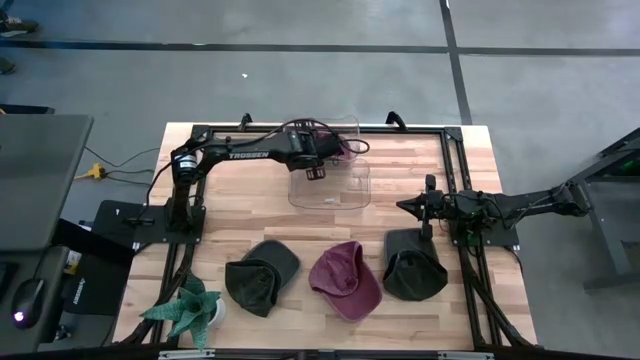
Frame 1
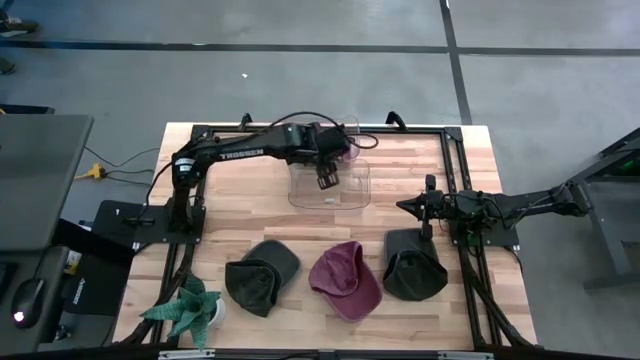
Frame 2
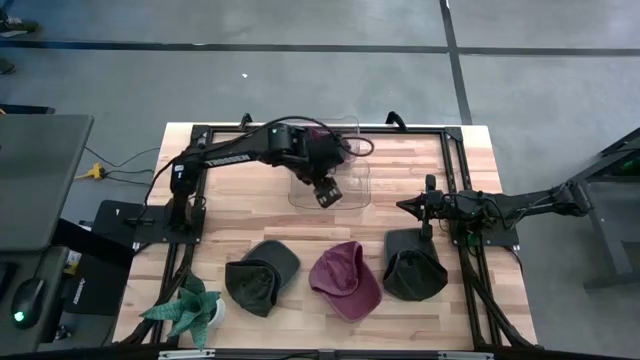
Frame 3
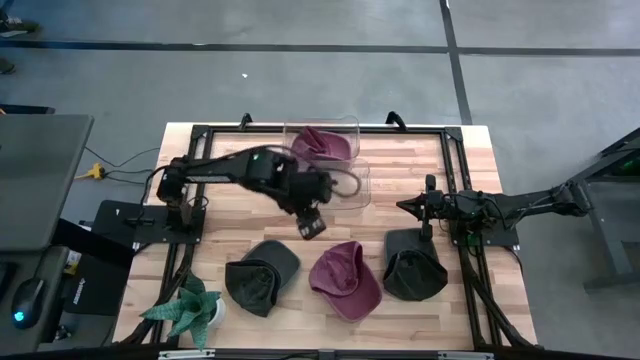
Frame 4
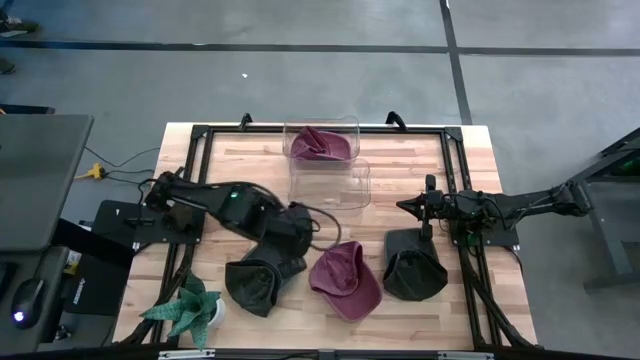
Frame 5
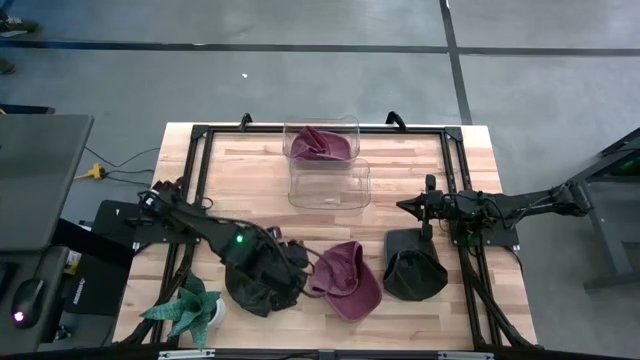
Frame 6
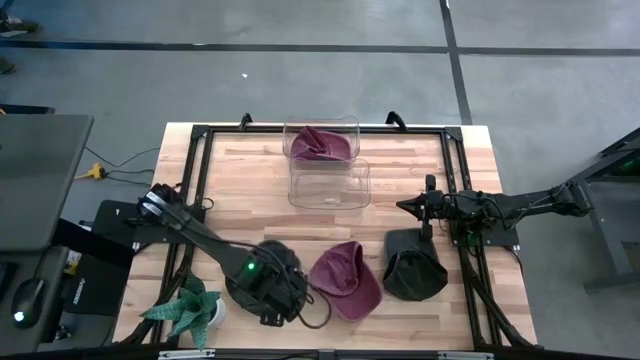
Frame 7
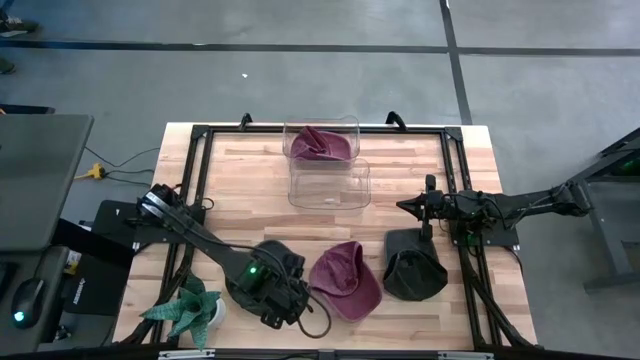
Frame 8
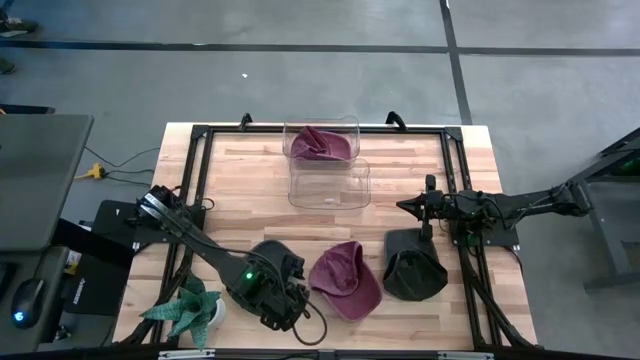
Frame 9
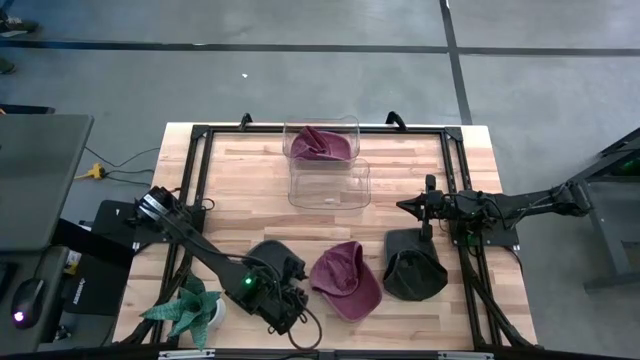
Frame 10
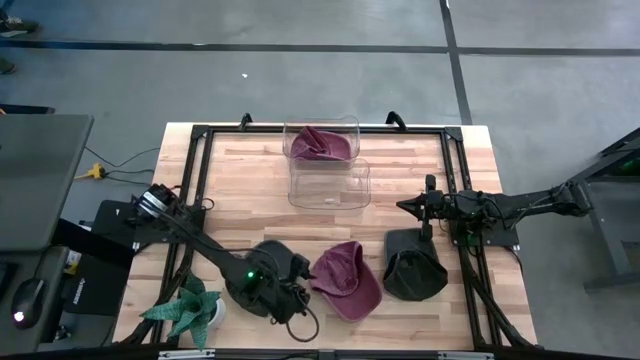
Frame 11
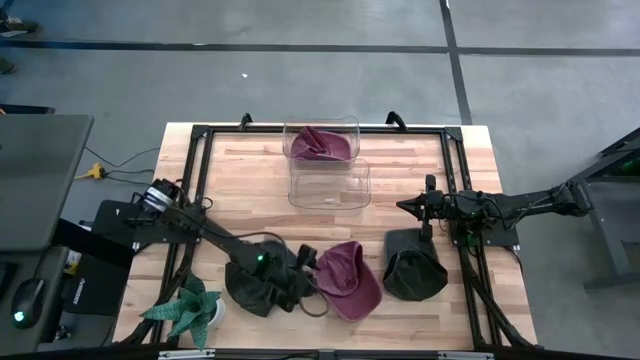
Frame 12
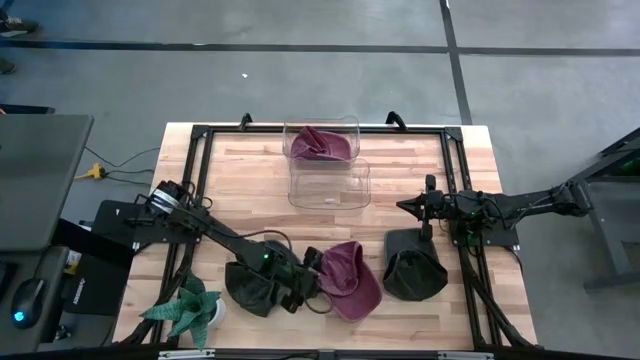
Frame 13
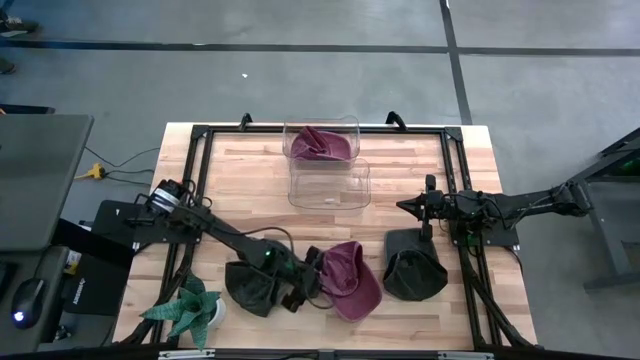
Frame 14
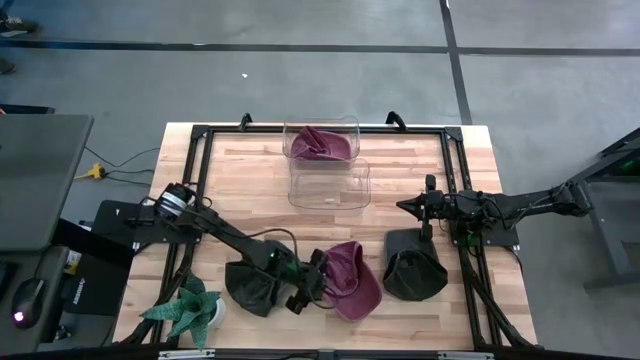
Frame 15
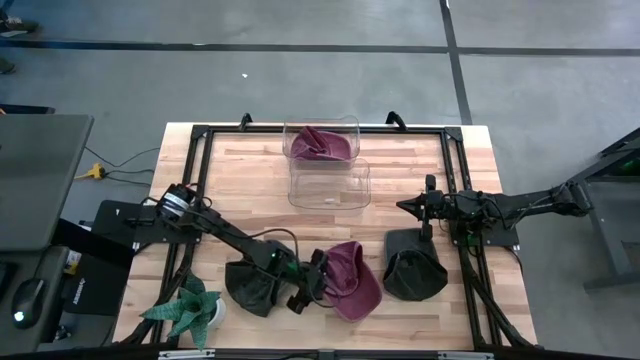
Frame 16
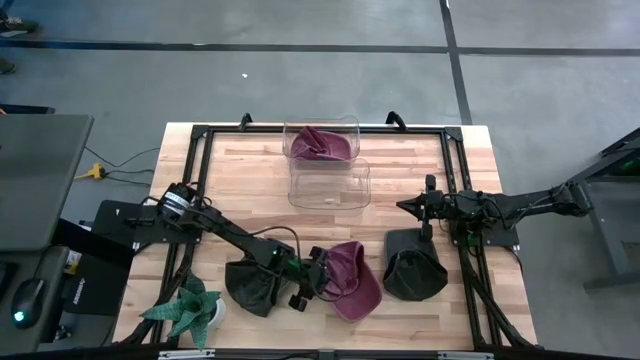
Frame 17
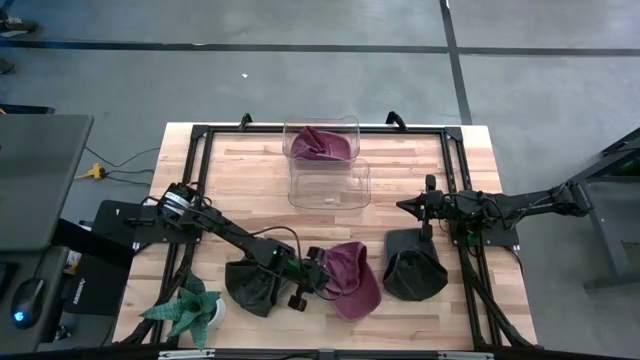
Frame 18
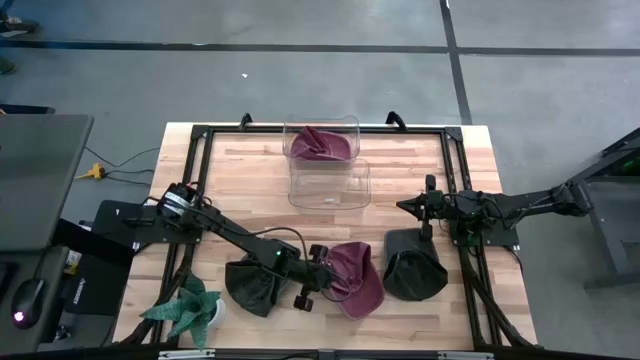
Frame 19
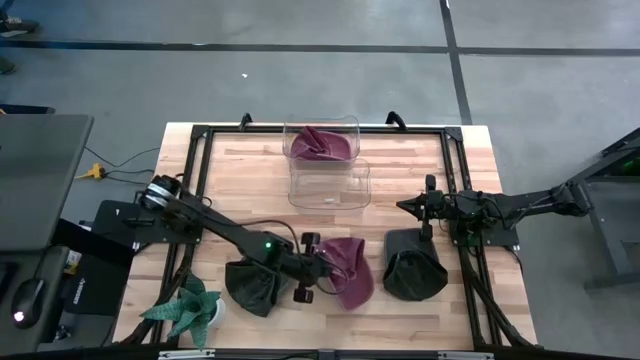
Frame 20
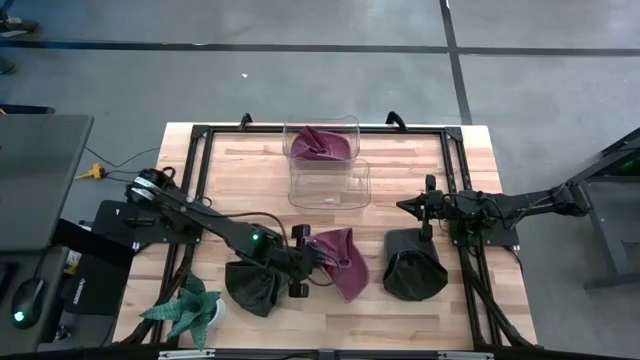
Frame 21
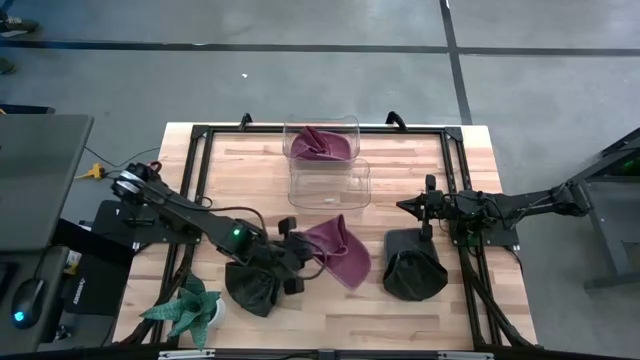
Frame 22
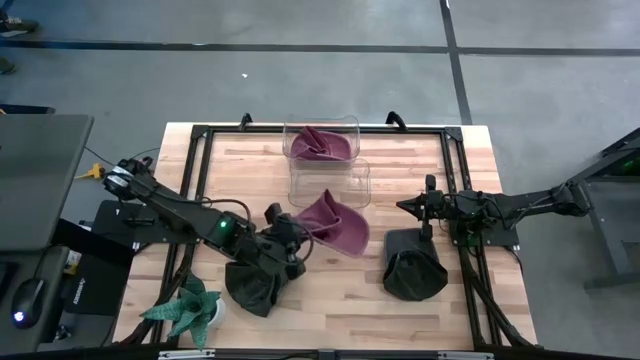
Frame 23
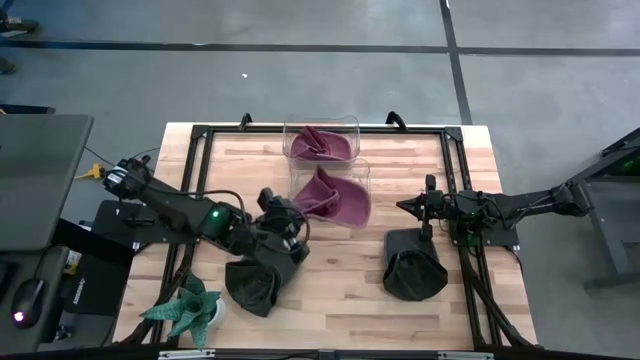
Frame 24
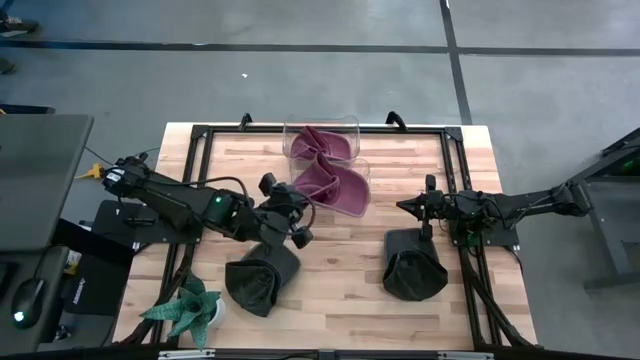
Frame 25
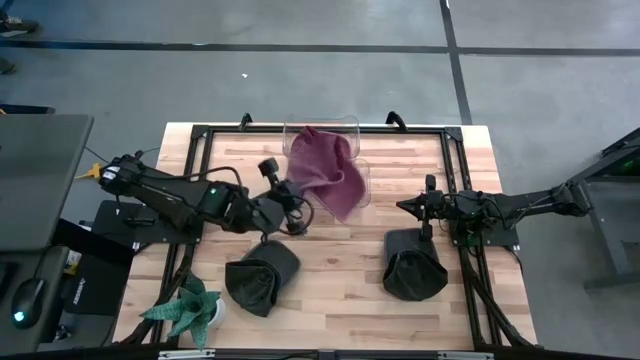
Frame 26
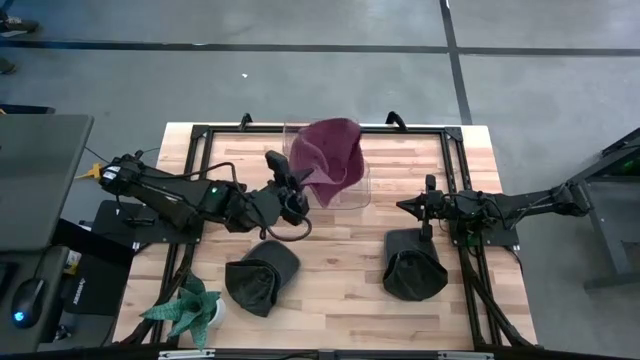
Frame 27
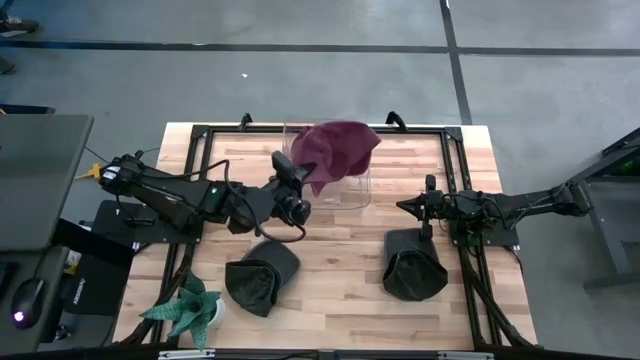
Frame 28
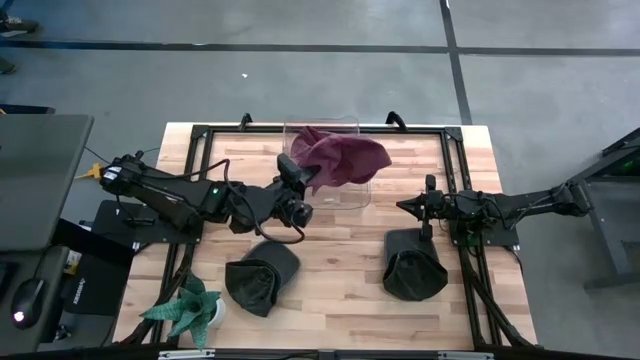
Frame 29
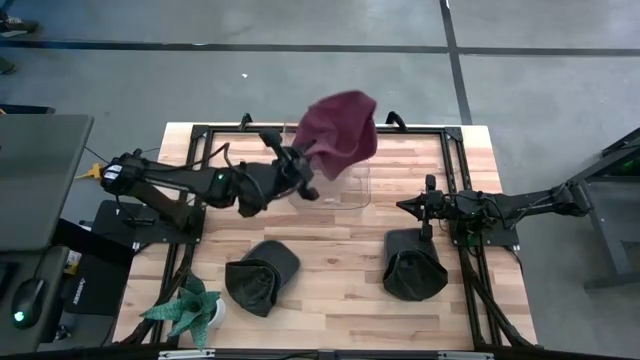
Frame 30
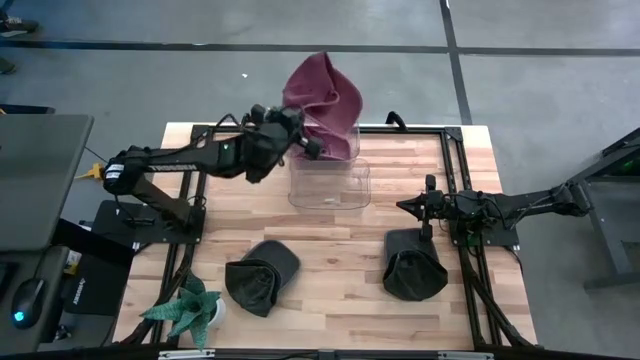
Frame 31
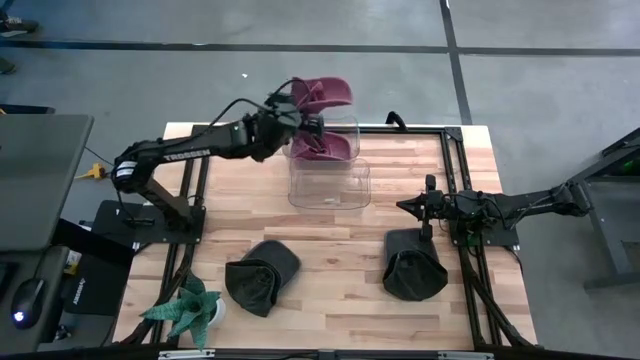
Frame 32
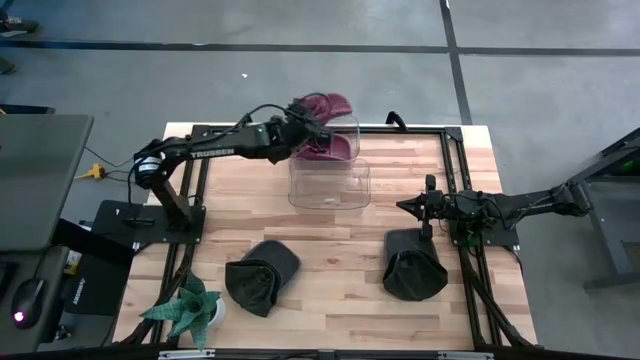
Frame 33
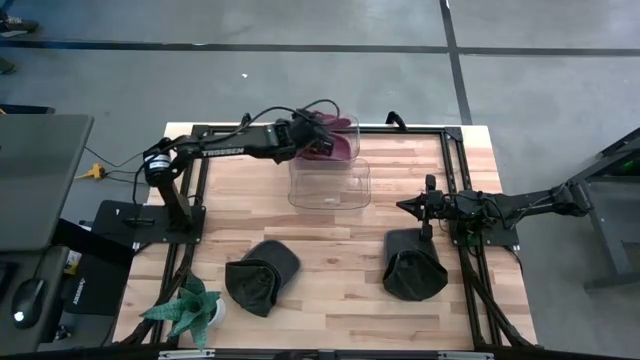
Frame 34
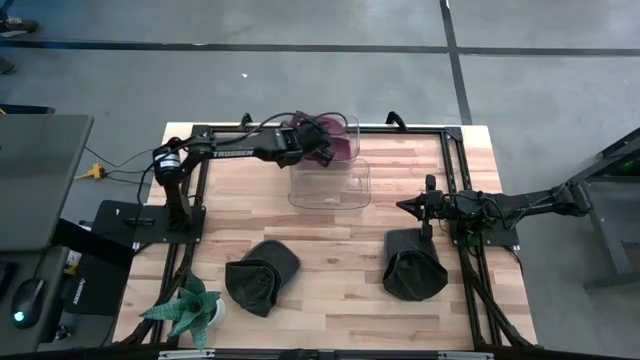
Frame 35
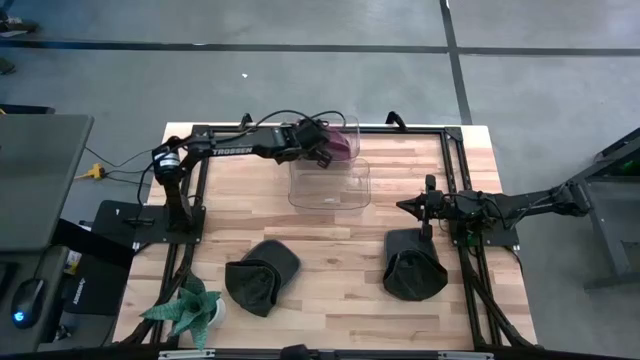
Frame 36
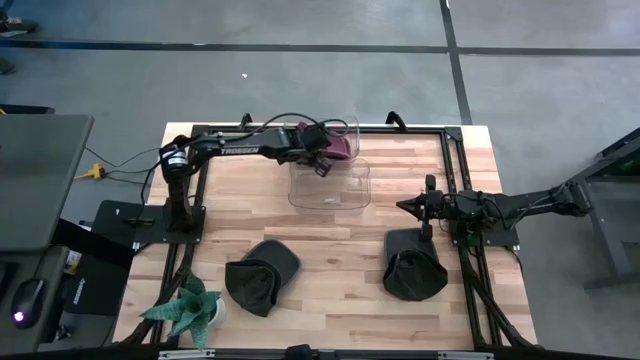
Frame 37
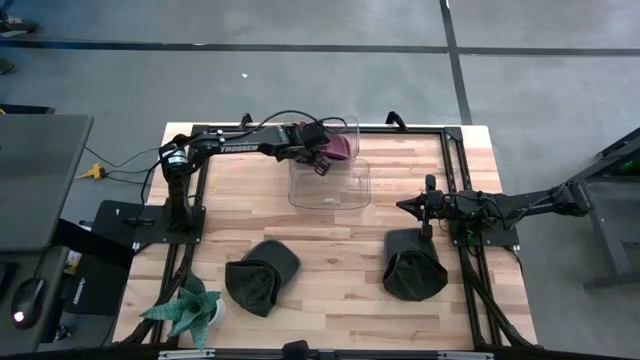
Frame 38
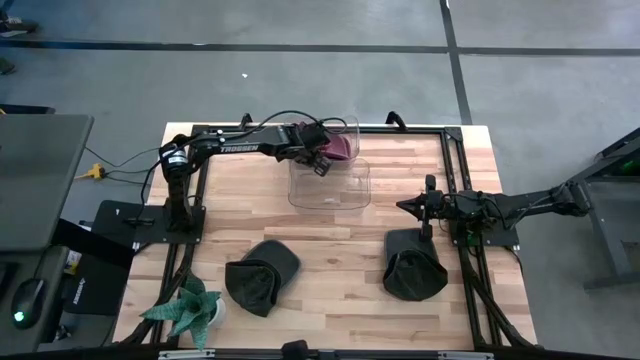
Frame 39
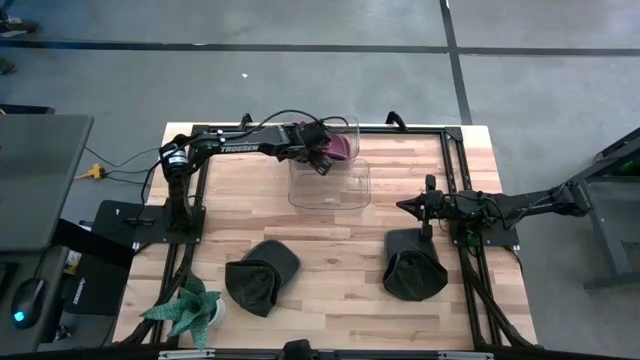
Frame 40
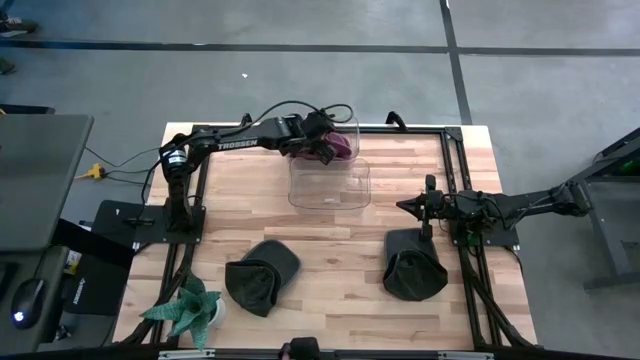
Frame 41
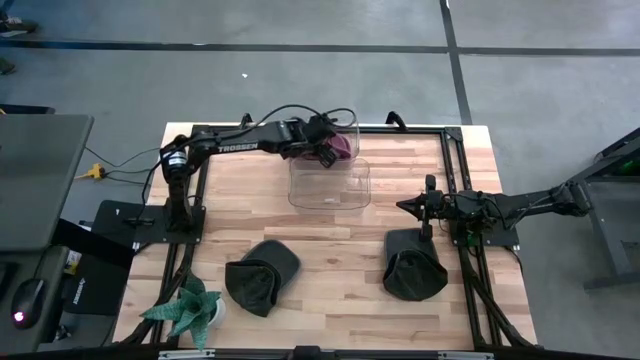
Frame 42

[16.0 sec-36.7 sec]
Task: Pick & Place hat
Put the dark red cap into the top transparent bin

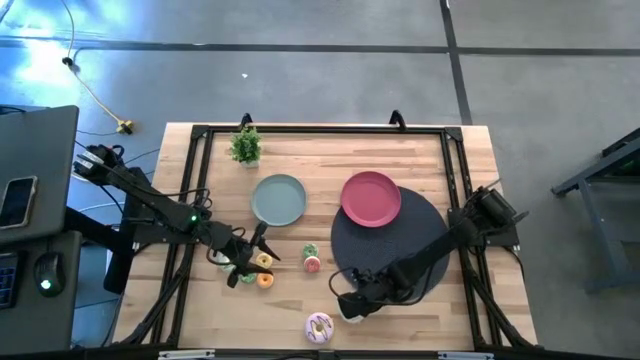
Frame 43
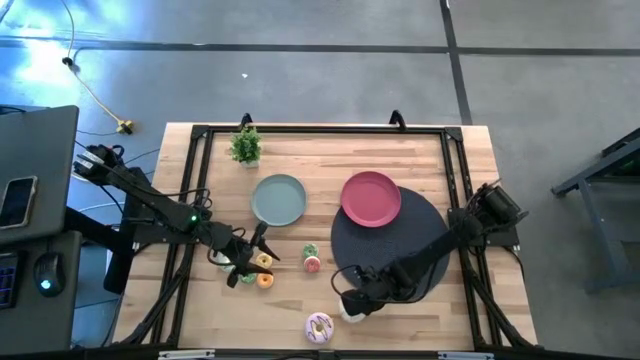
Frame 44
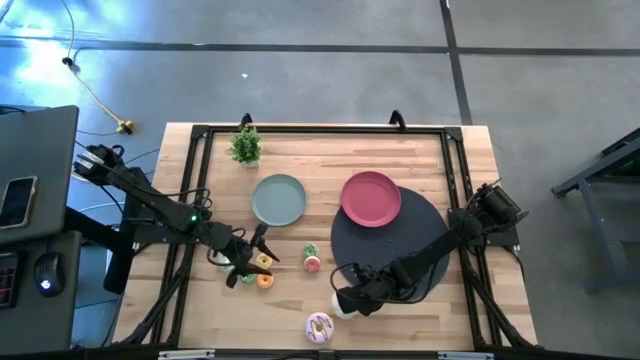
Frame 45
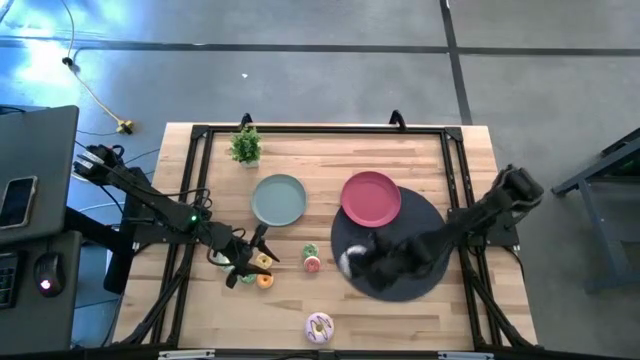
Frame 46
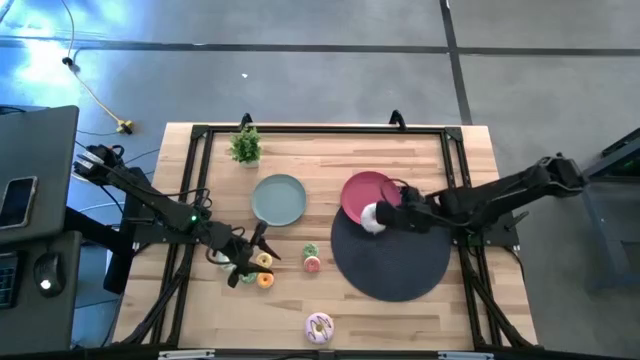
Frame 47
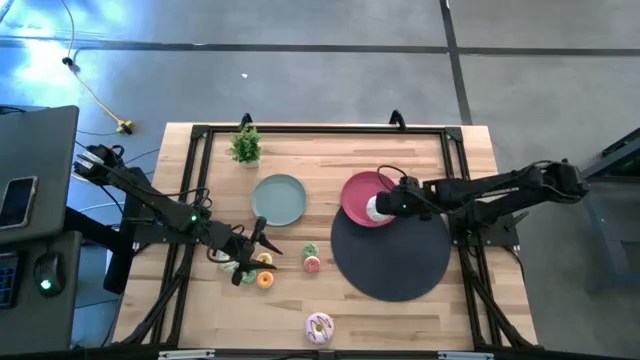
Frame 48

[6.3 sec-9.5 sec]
Task: Pick & Place donuts
Put the large white donut on the red plate
